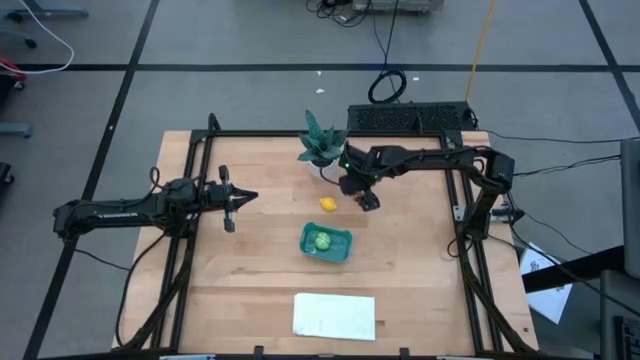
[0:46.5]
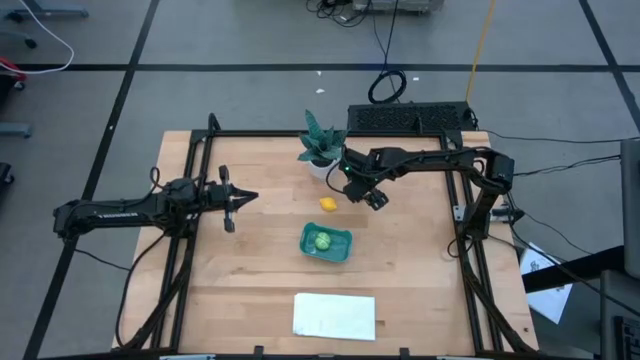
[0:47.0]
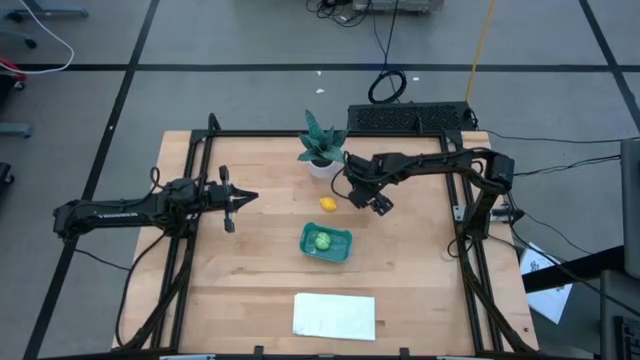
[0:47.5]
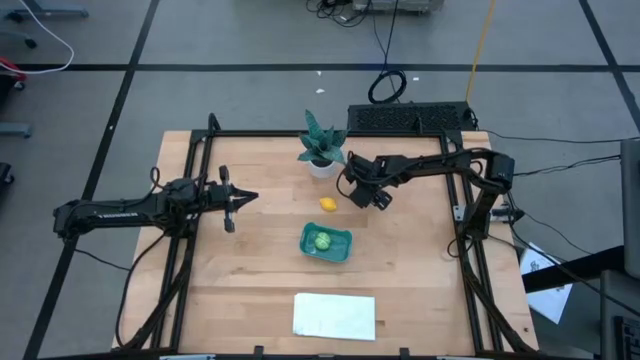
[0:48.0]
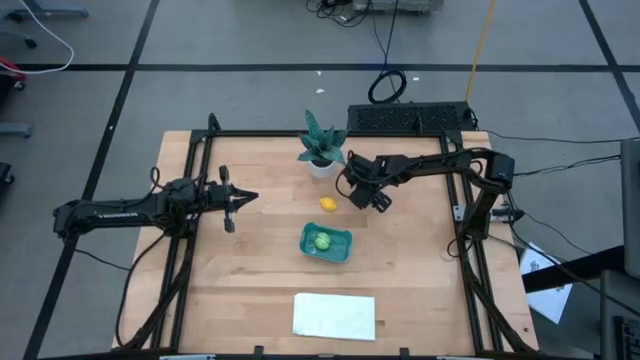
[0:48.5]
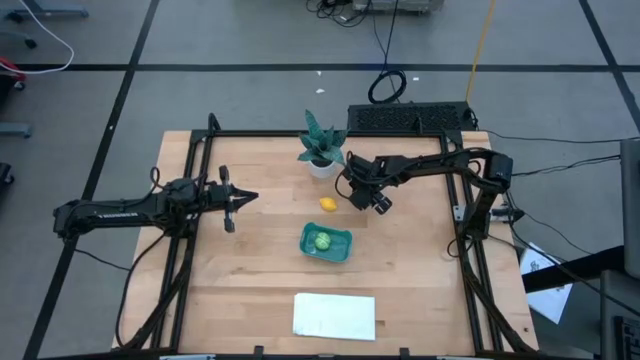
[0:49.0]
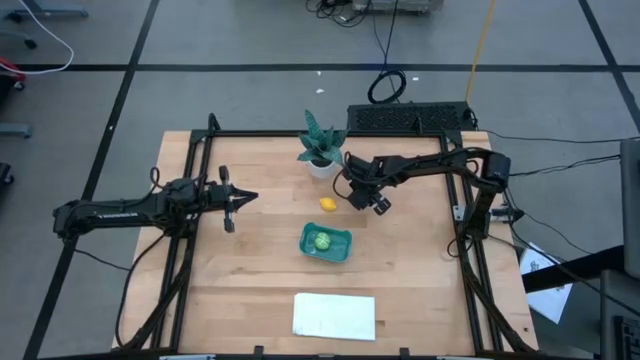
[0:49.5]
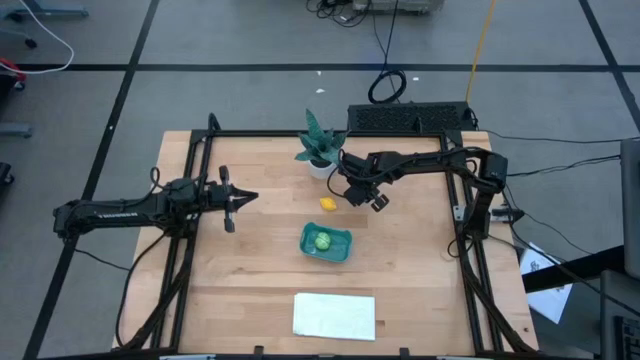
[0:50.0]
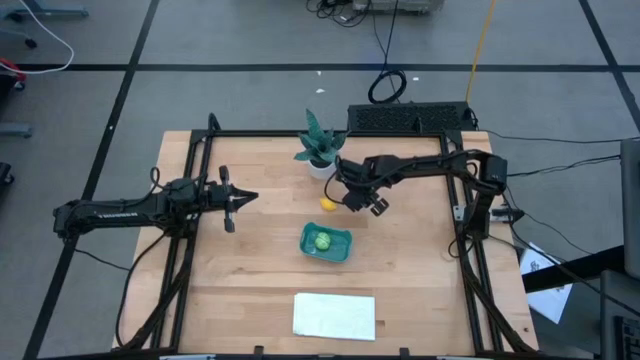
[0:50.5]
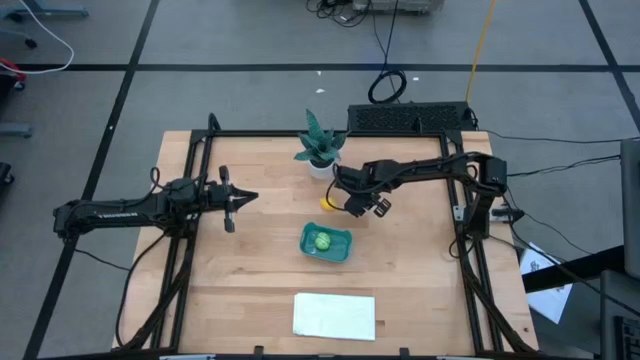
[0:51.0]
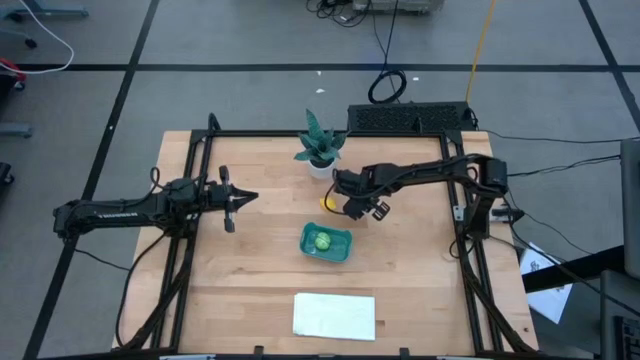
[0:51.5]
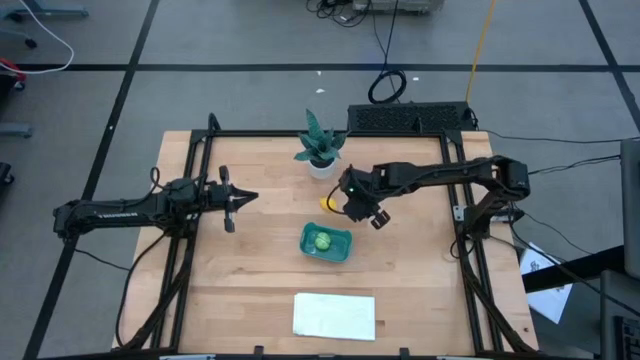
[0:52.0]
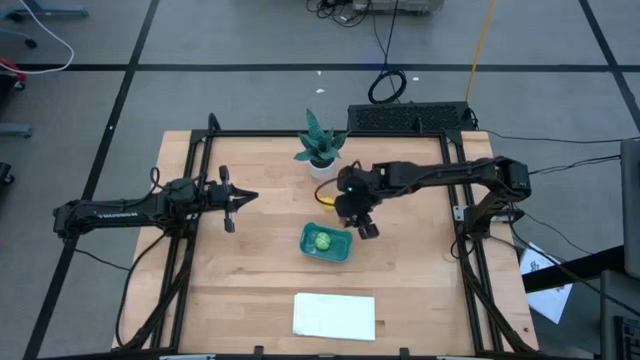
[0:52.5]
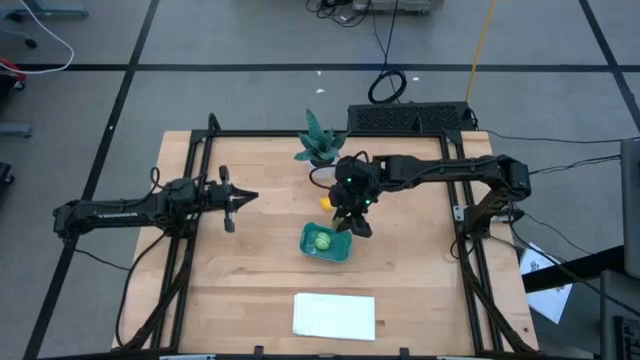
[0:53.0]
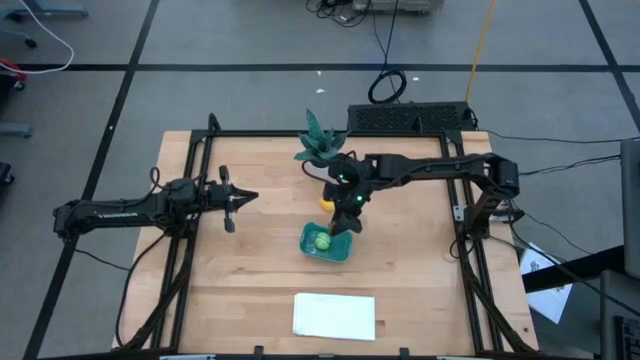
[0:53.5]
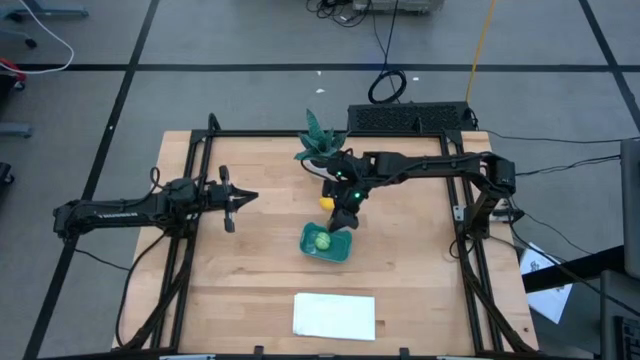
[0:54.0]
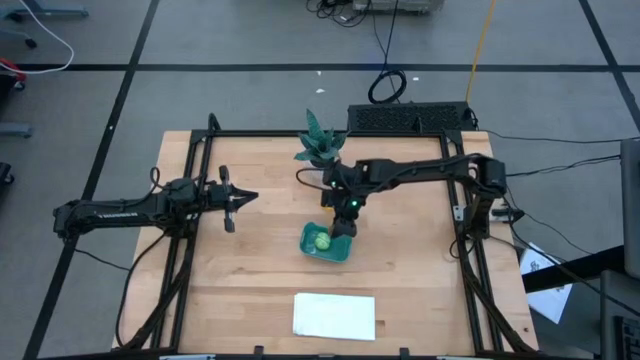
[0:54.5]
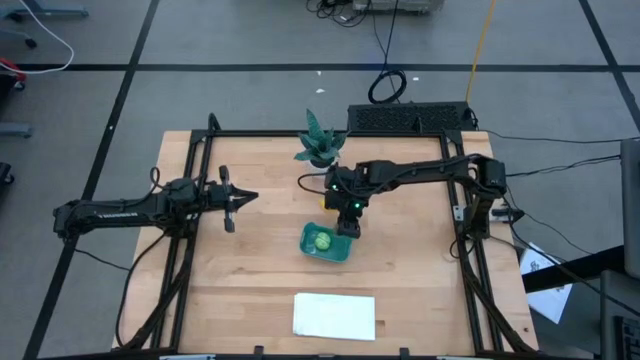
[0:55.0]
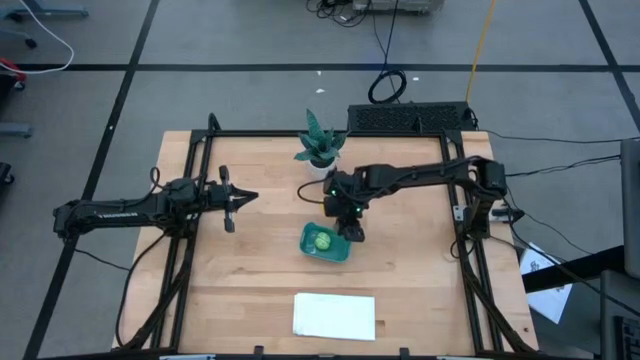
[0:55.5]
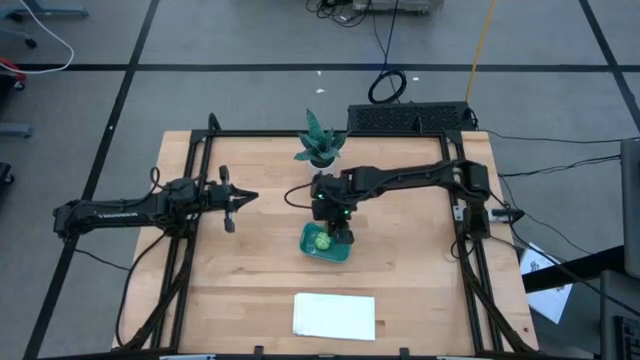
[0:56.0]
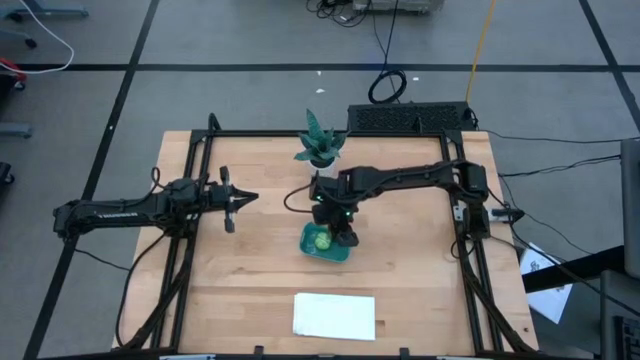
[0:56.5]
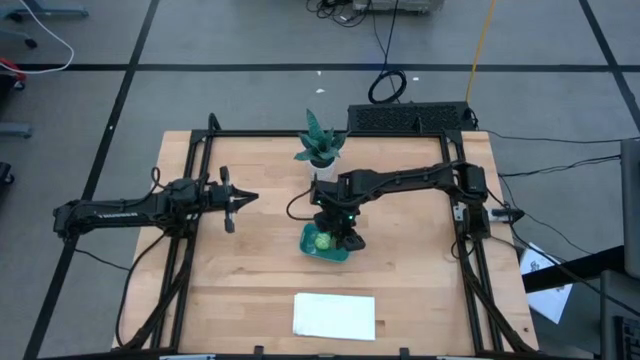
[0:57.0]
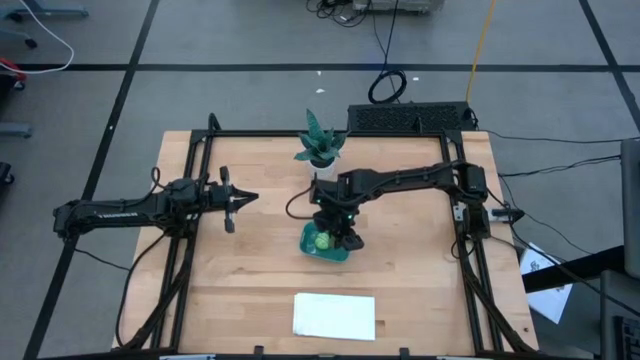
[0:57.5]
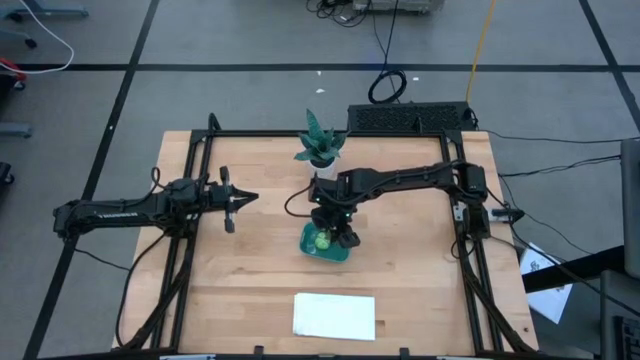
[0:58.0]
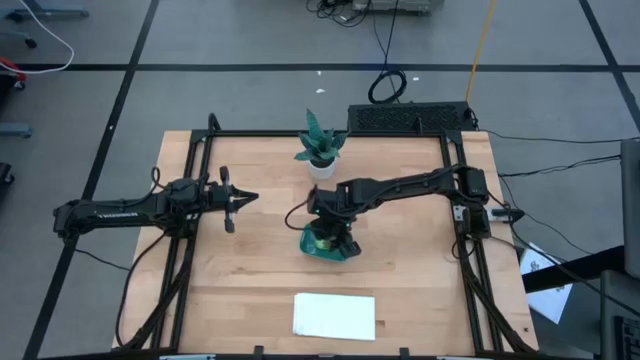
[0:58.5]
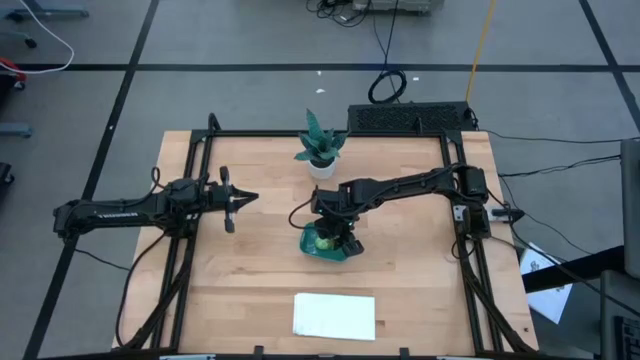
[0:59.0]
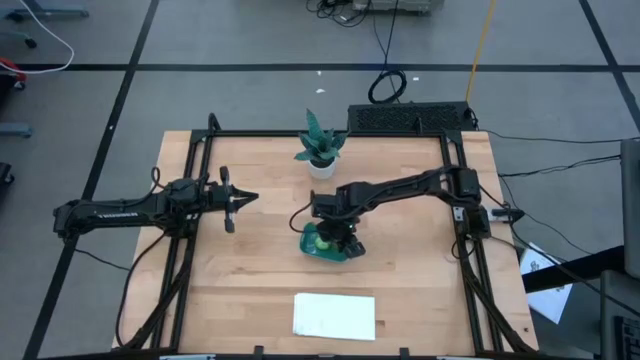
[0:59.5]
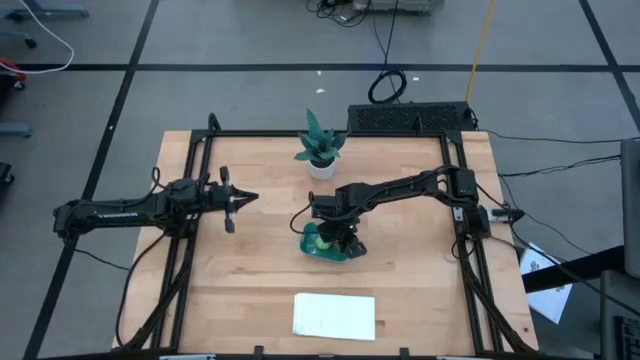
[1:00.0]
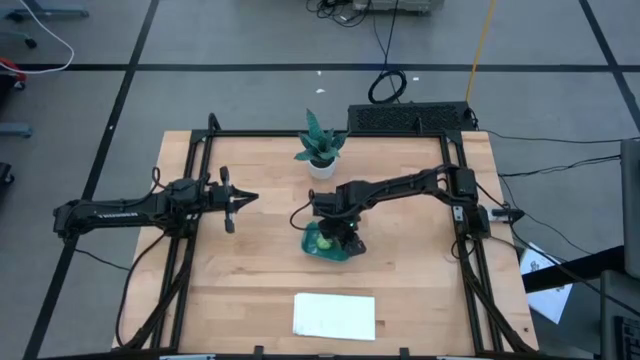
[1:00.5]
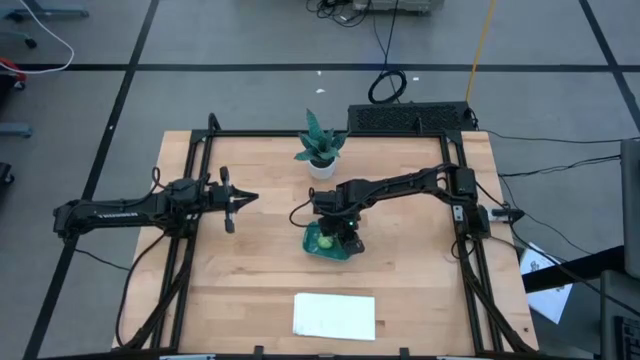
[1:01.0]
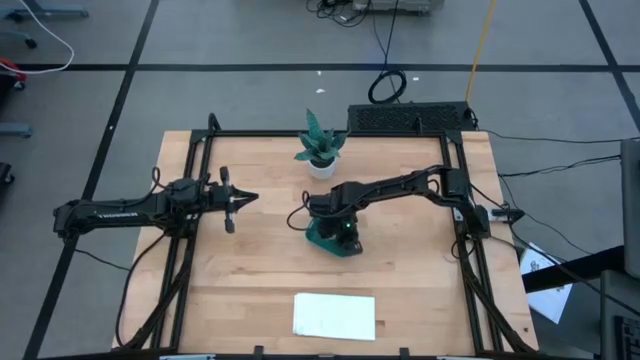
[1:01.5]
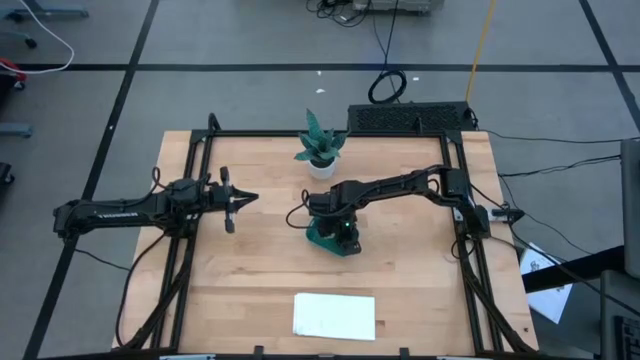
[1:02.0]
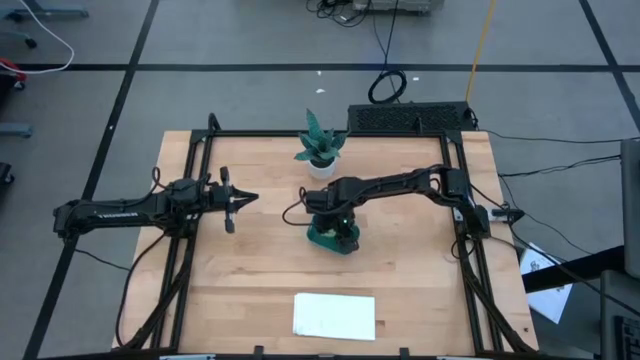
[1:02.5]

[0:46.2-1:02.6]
Task: Pick and placing Produce into tupperware
Put the red strawberry into the green bin
